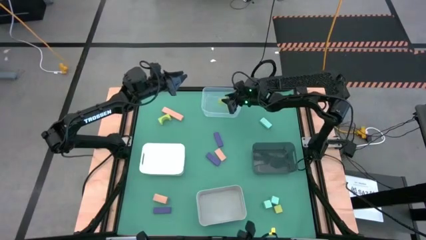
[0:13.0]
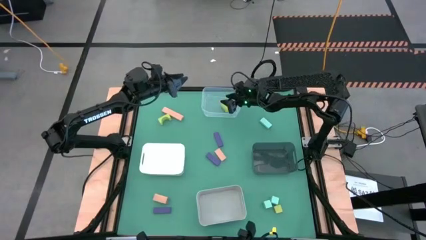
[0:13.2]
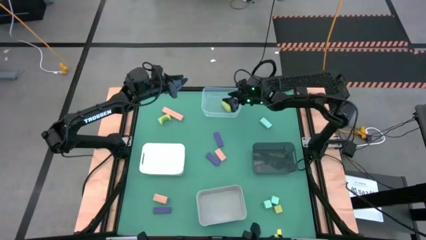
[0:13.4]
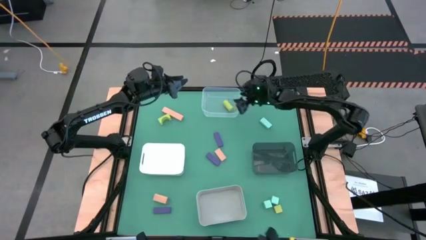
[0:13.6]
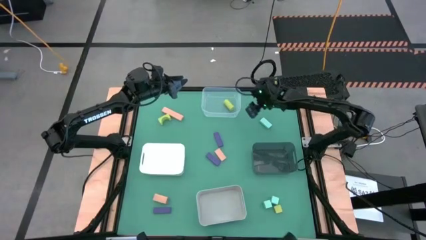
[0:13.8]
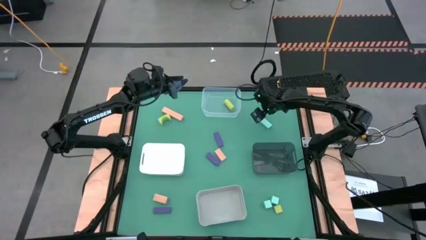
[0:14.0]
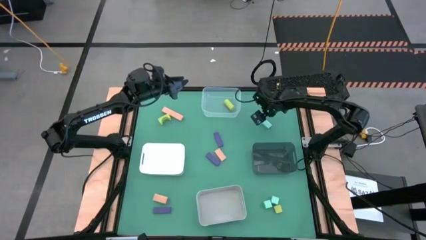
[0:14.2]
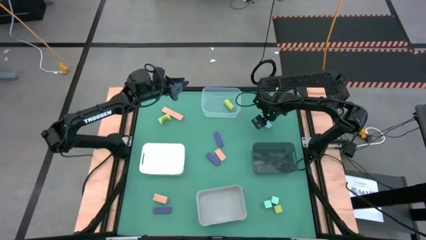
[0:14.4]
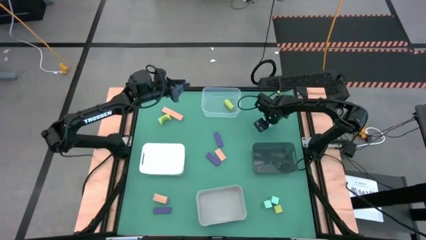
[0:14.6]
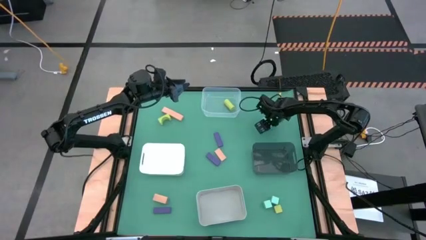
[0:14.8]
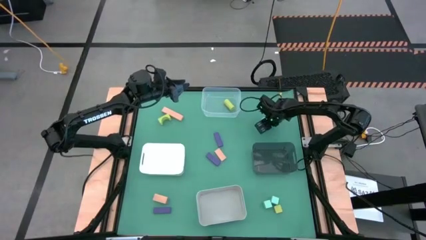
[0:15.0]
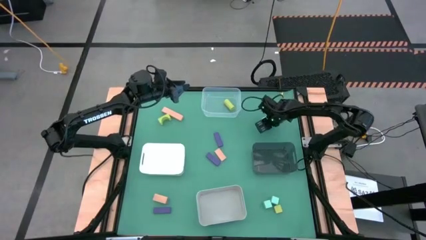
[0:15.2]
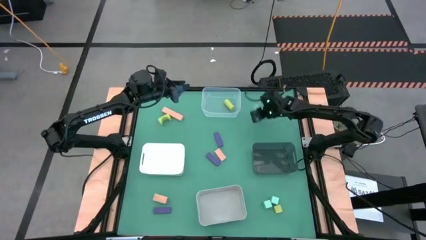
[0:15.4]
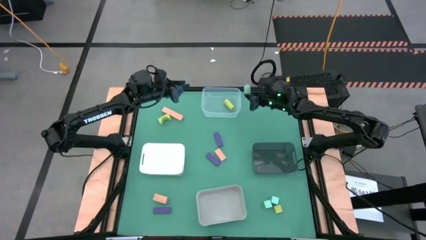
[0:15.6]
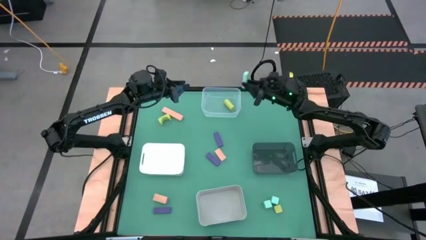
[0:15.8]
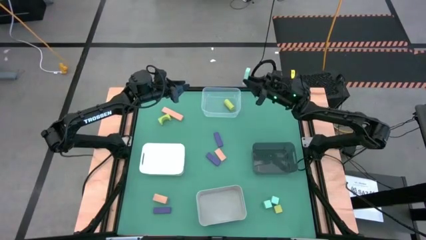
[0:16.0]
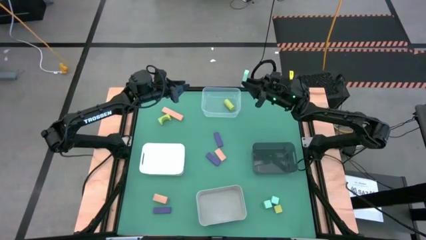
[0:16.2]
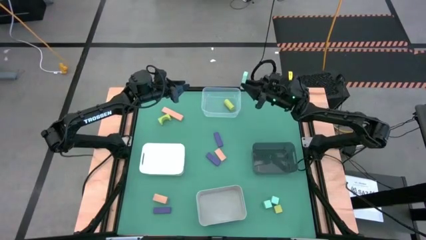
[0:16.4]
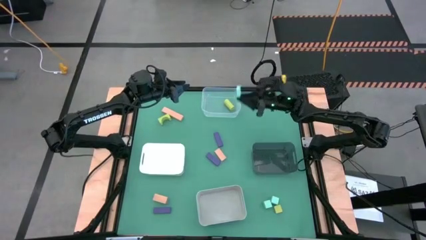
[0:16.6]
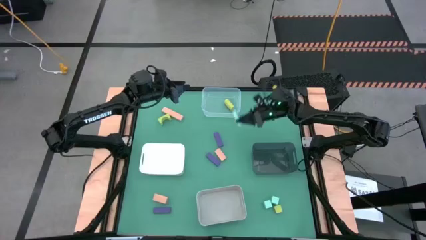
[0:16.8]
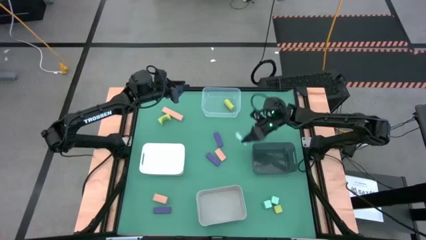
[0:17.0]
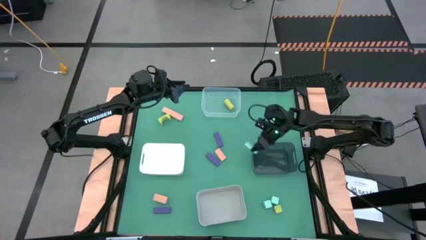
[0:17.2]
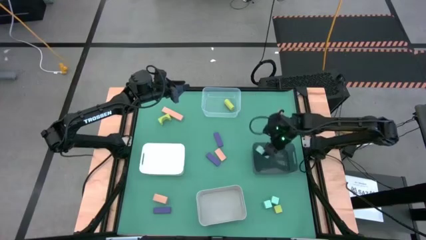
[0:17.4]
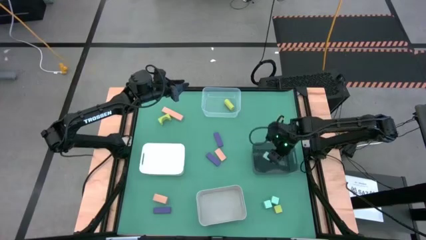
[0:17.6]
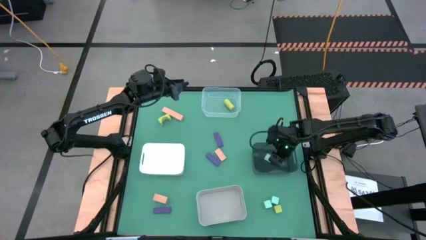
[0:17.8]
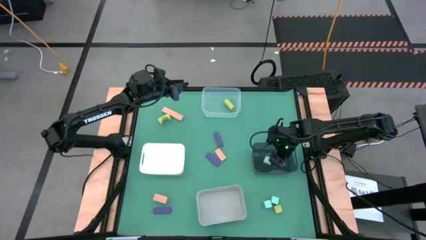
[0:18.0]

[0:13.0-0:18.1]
Task: Sort & place blocks by color
Put the top light blue block into the black bin

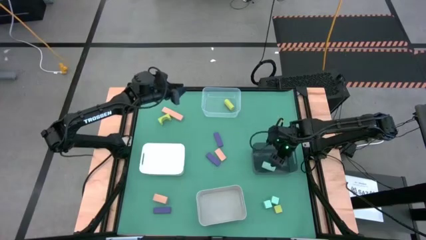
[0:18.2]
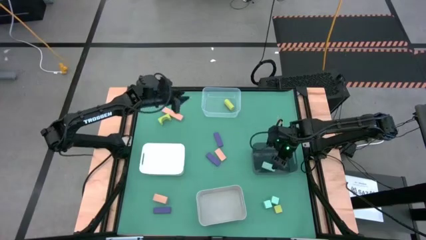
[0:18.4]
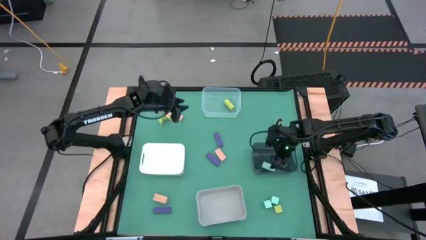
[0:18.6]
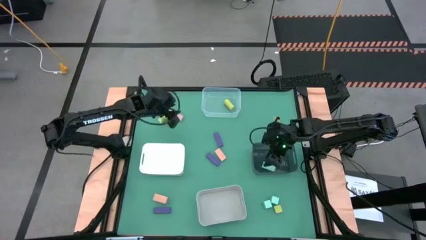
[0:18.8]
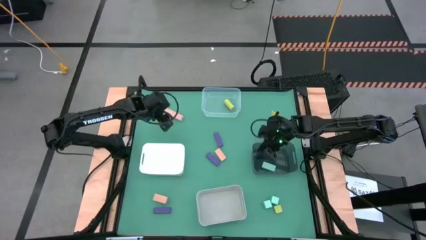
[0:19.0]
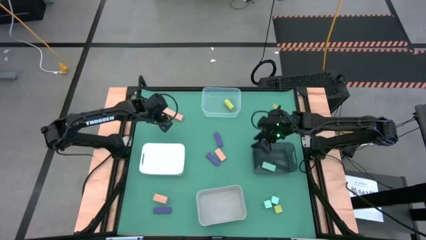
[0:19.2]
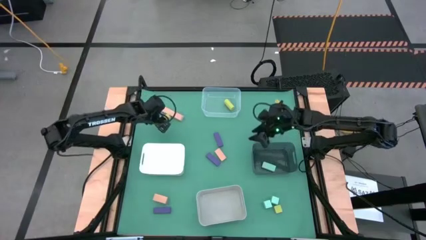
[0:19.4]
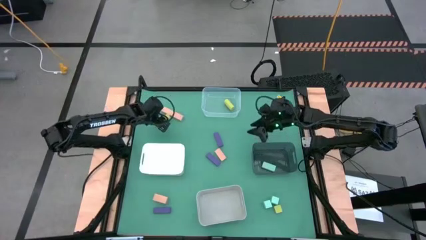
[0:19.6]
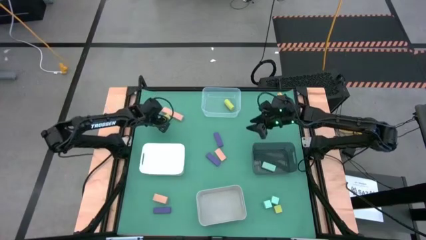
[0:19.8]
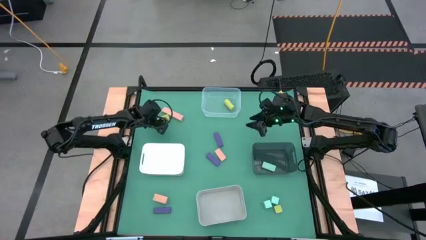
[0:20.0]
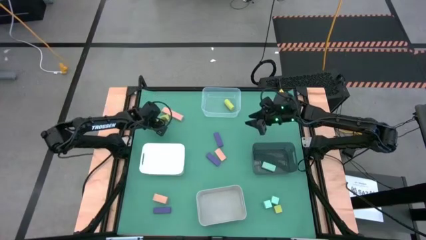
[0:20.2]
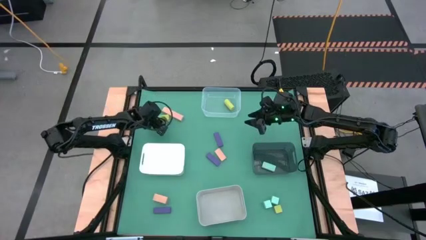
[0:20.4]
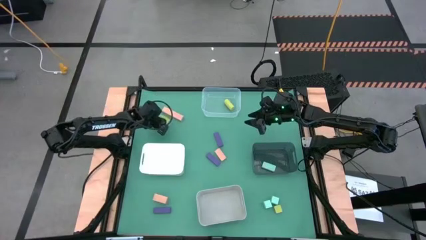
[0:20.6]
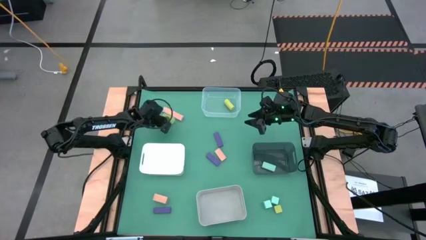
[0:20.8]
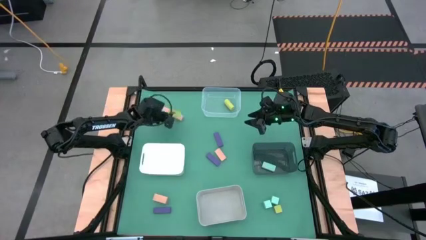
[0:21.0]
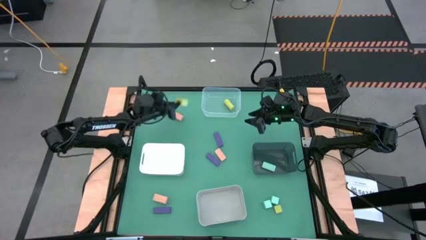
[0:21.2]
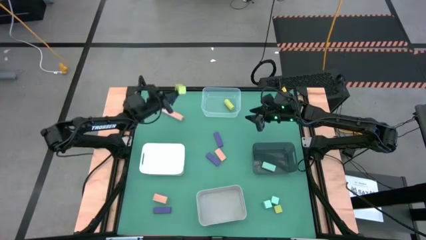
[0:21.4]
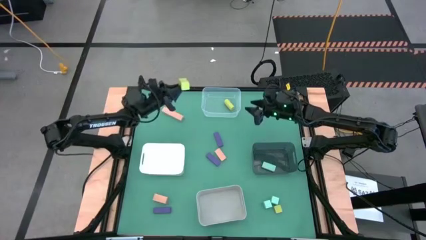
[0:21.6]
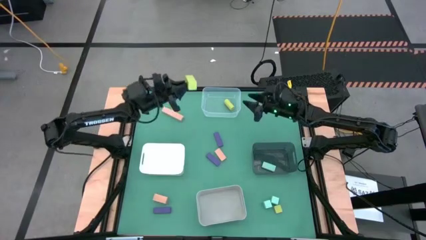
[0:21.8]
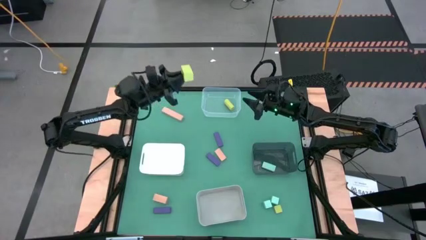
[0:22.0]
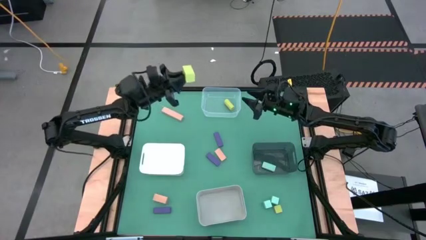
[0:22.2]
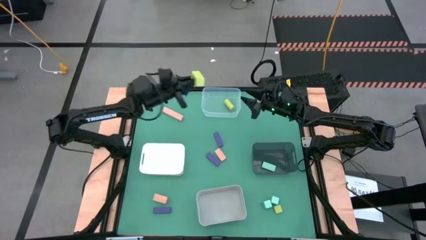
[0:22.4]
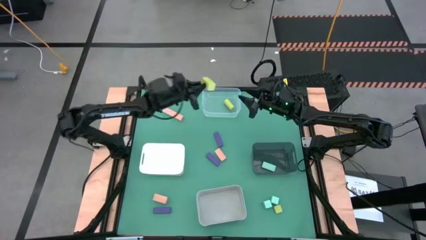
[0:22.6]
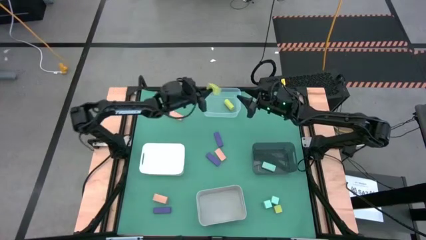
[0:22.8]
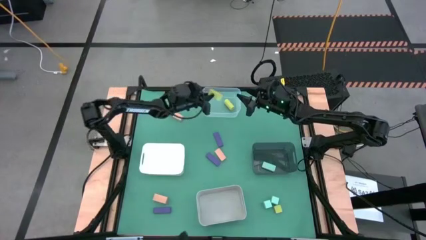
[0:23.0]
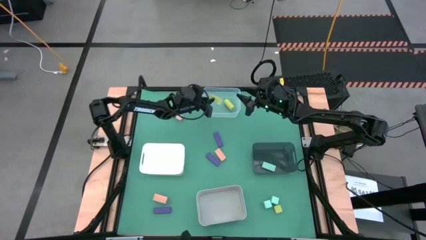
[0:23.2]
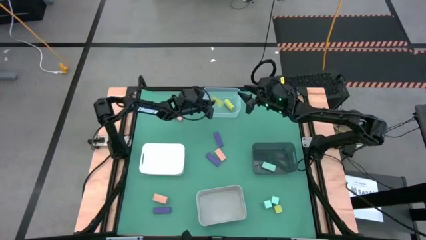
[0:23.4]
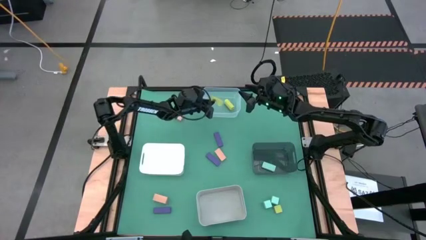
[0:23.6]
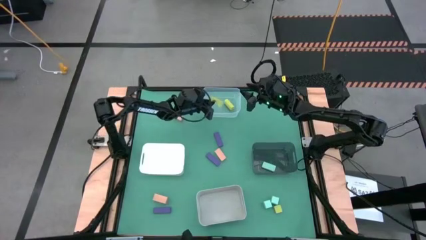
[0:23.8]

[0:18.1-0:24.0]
Put the top green block into the transparent bin

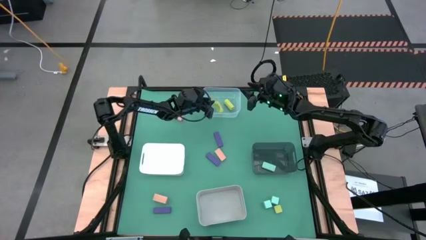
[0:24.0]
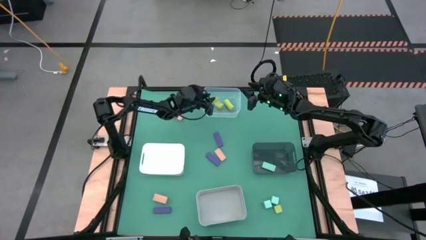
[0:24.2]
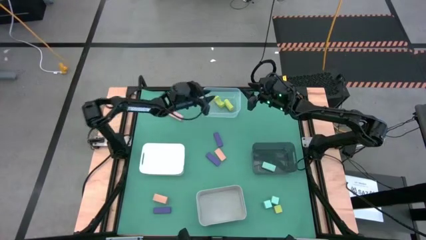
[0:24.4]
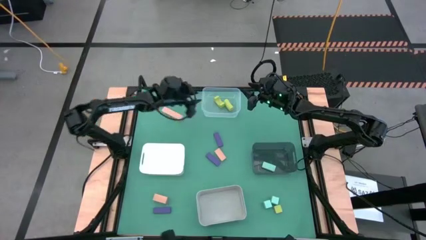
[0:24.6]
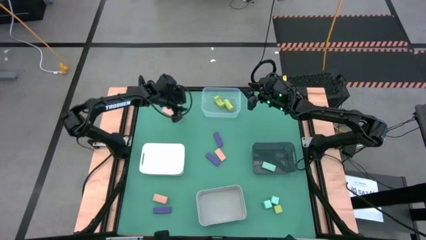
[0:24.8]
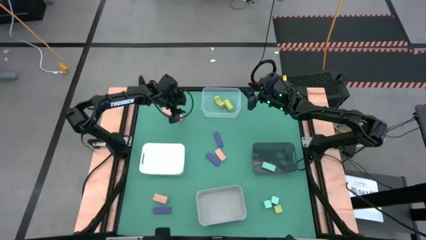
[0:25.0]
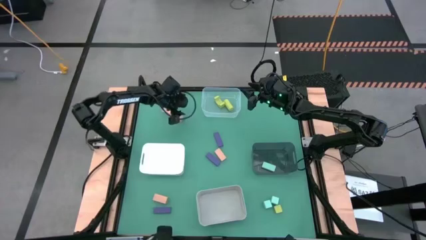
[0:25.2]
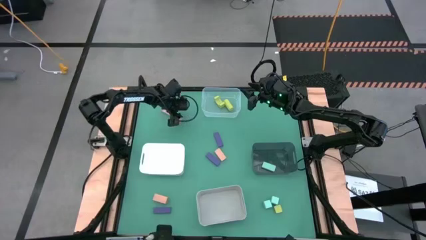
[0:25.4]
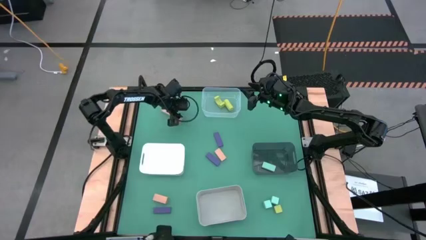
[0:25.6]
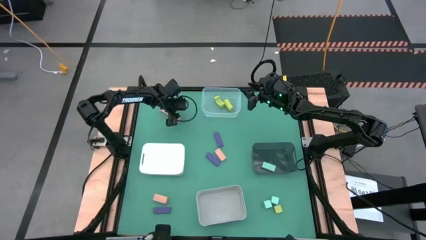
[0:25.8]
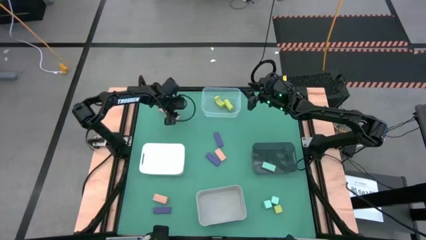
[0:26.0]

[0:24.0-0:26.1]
Put the top light brown block into the white bin

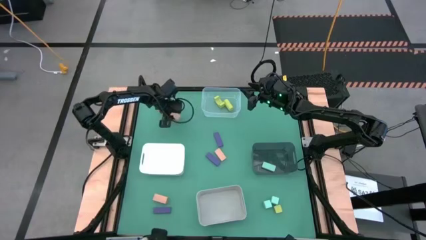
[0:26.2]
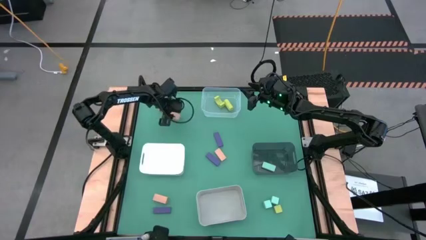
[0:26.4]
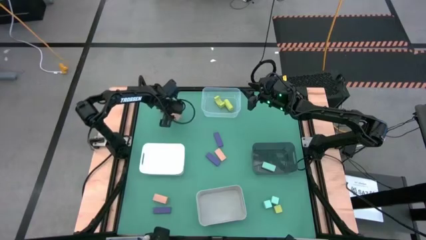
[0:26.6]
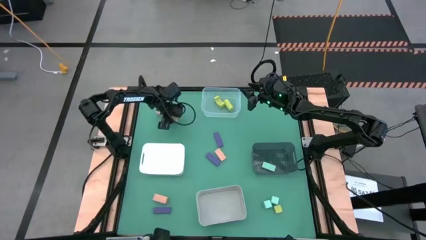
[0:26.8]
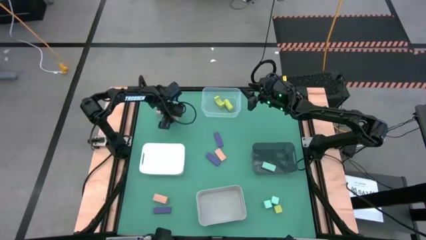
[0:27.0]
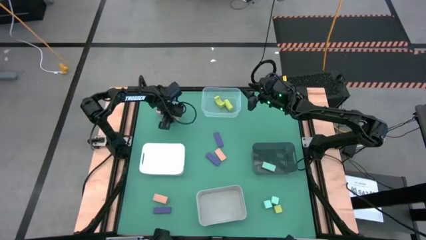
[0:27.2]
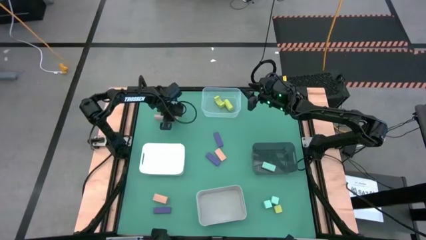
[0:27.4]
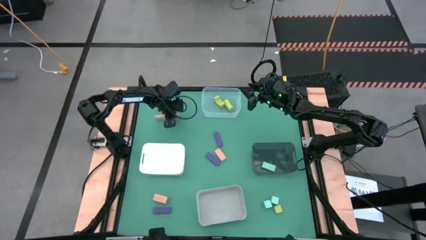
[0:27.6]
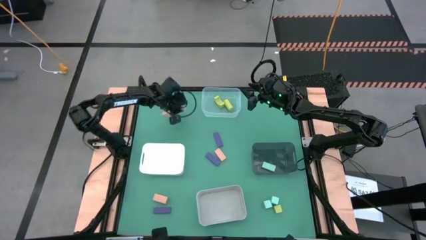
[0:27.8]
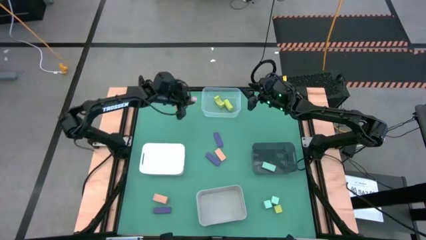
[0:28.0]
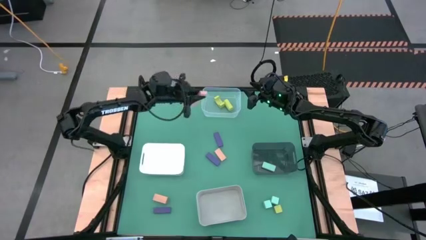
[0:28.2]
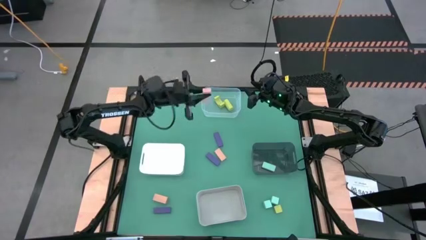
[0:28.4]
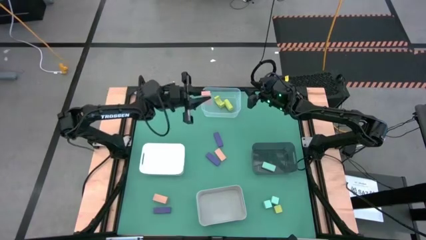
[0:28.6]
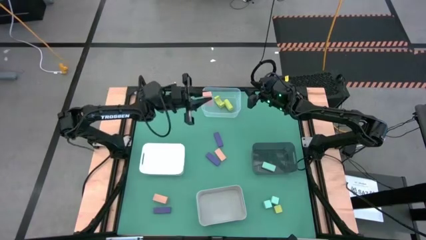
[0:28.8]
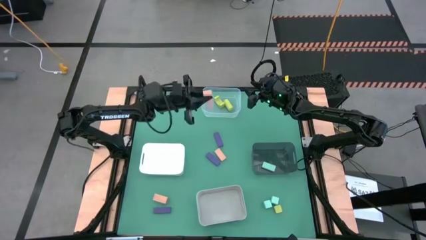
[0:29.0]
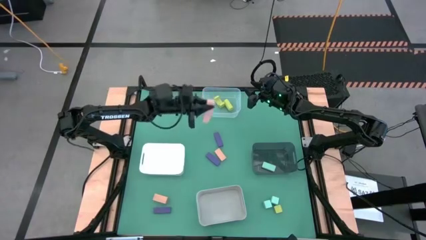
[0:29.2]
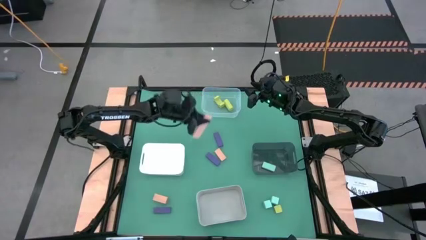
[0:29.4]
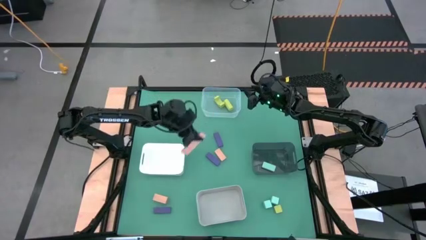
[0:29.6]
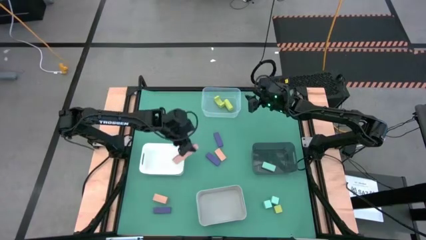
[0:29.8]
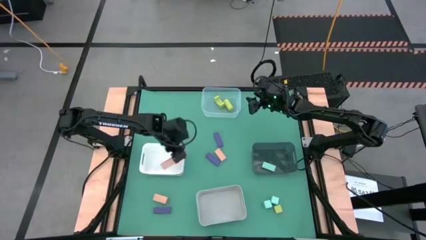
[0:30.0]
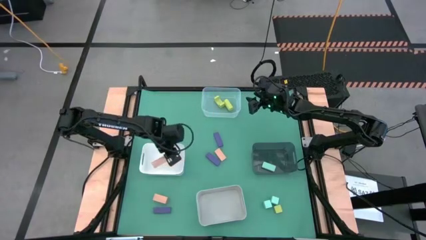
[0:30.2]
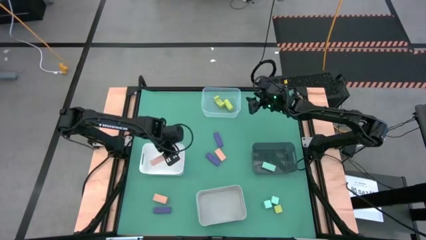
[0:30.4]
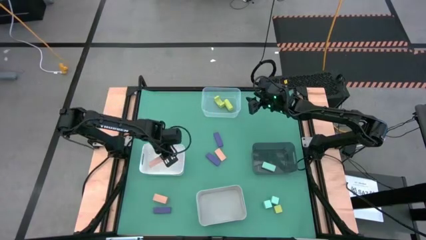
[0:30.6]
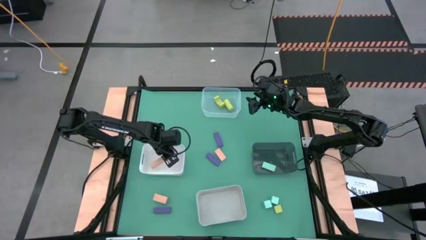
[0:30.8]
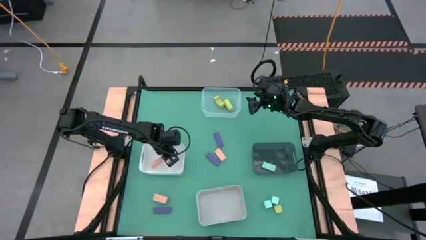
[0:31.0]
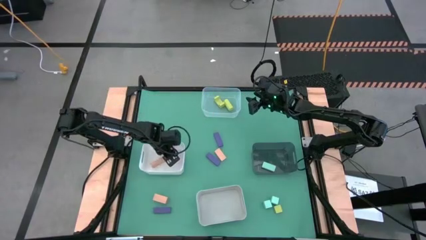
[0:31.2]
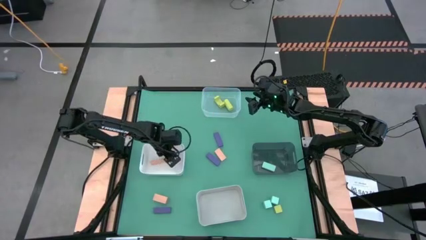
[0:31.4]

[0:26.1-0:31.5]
Put the top light brown block into the white bin
